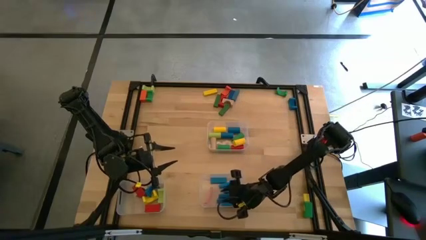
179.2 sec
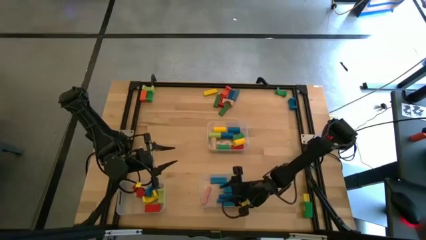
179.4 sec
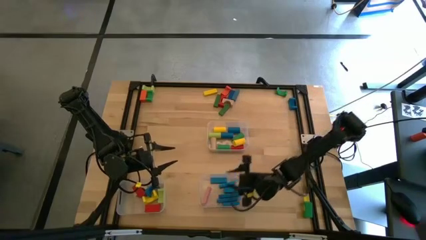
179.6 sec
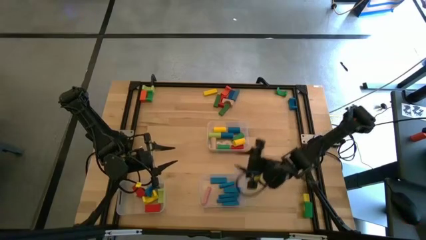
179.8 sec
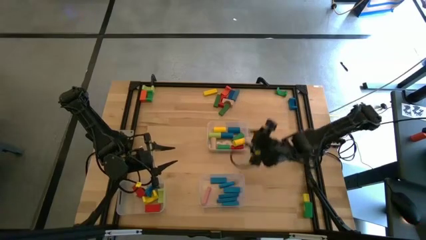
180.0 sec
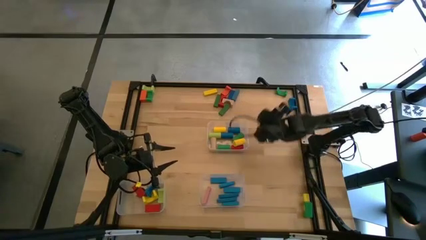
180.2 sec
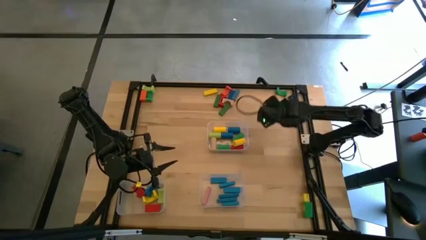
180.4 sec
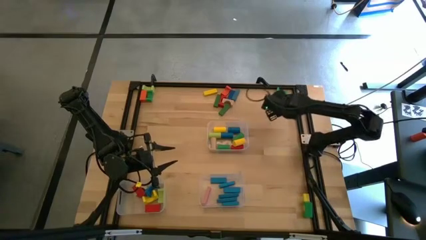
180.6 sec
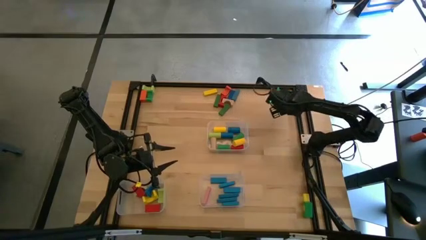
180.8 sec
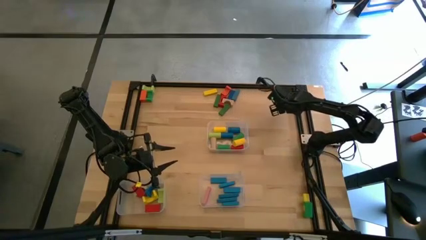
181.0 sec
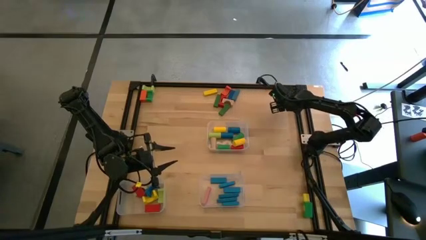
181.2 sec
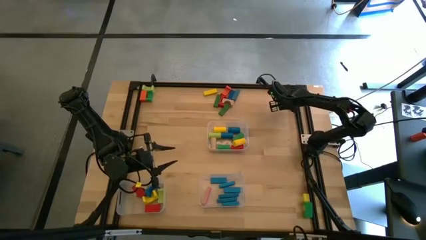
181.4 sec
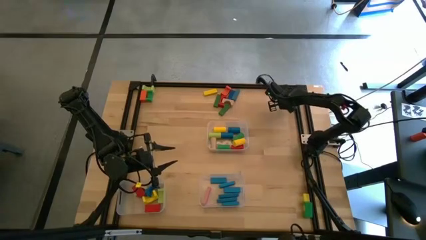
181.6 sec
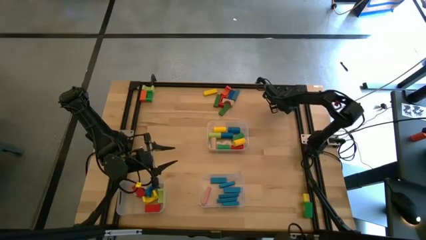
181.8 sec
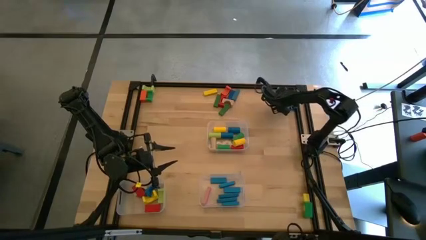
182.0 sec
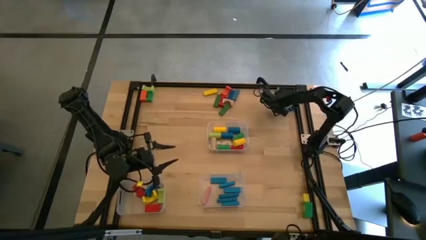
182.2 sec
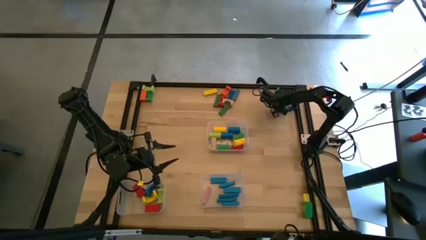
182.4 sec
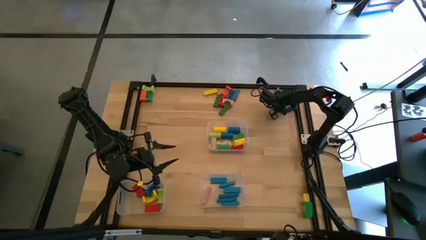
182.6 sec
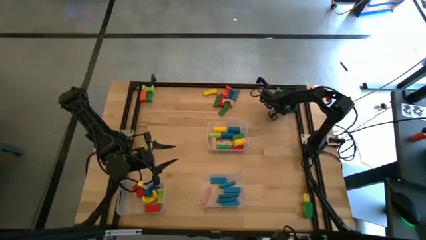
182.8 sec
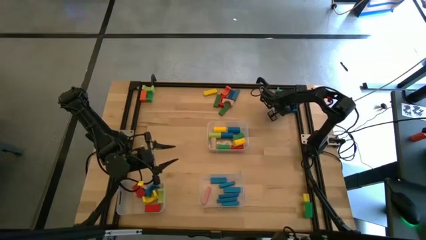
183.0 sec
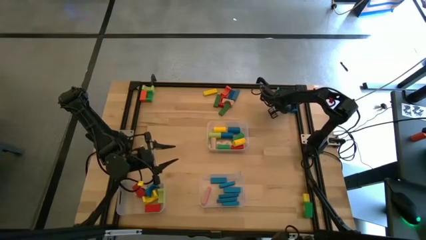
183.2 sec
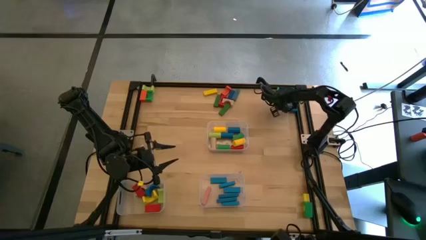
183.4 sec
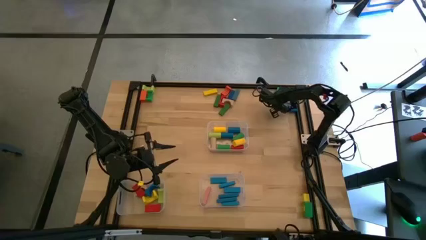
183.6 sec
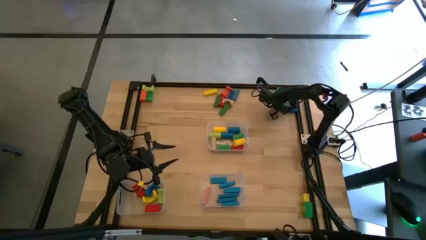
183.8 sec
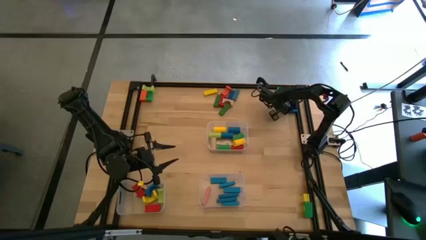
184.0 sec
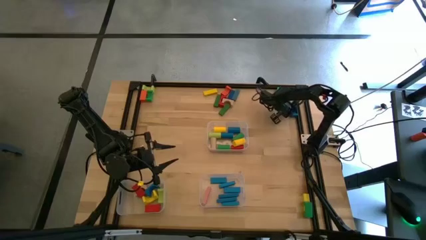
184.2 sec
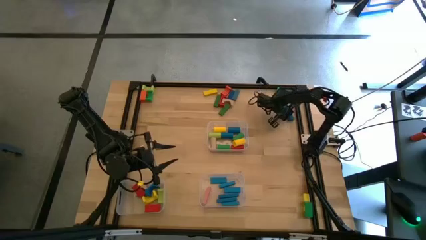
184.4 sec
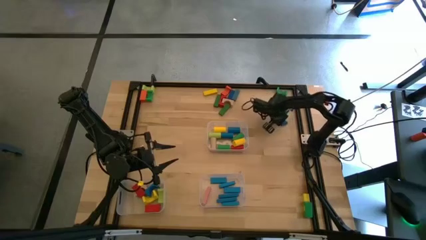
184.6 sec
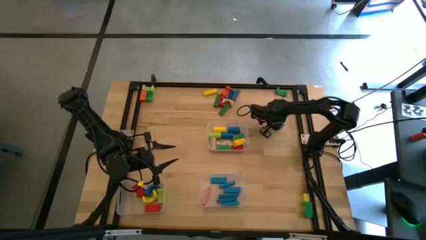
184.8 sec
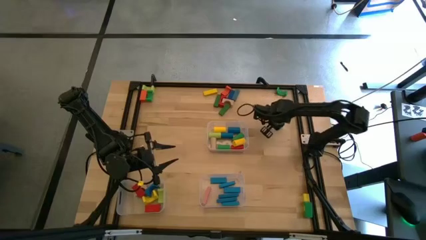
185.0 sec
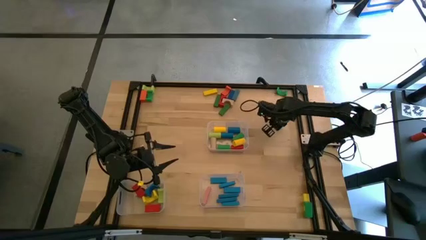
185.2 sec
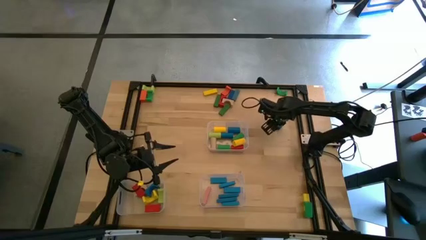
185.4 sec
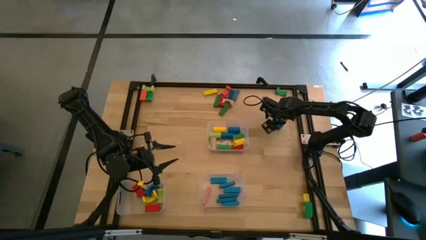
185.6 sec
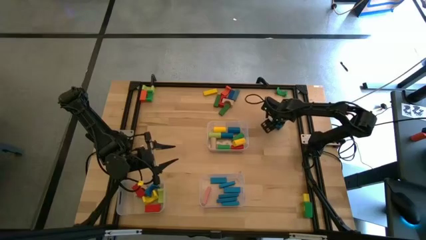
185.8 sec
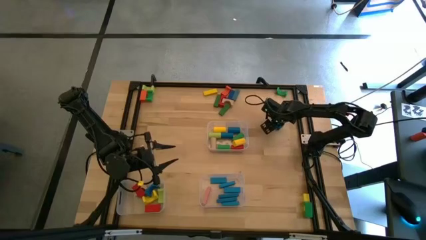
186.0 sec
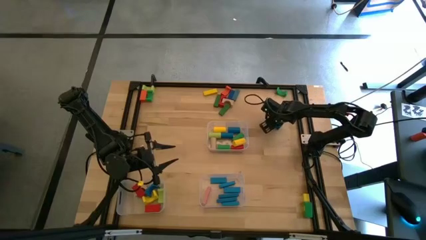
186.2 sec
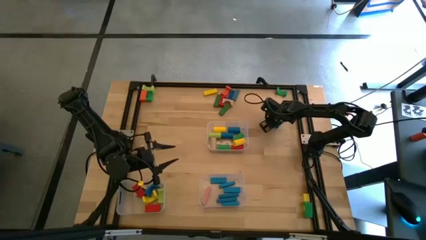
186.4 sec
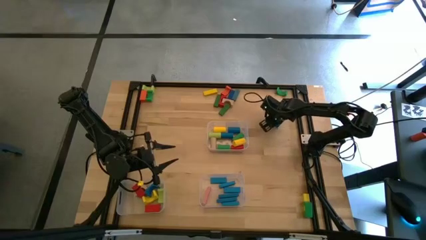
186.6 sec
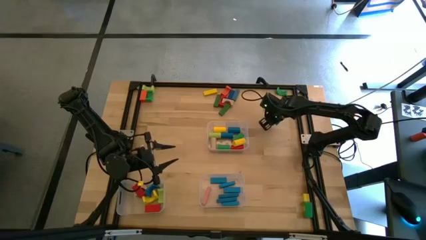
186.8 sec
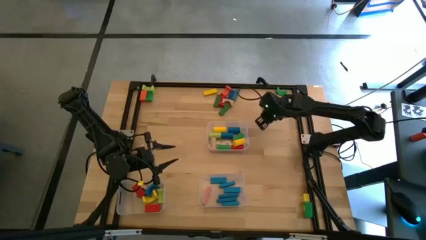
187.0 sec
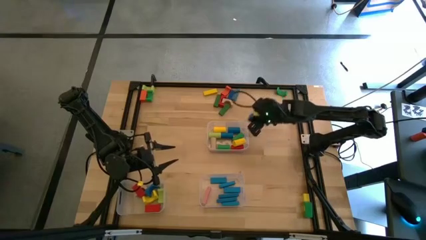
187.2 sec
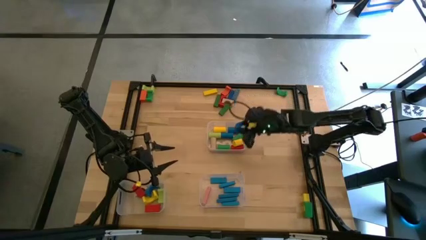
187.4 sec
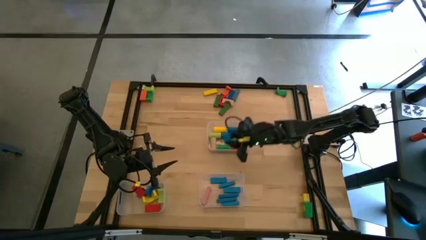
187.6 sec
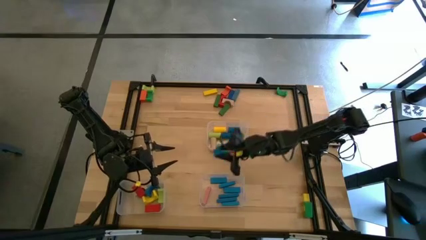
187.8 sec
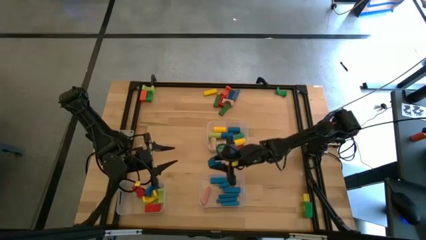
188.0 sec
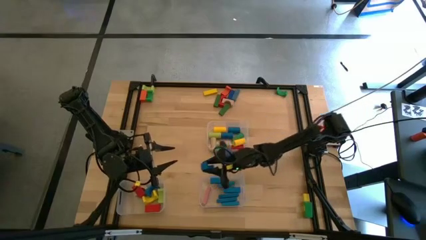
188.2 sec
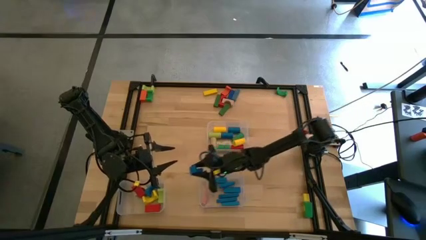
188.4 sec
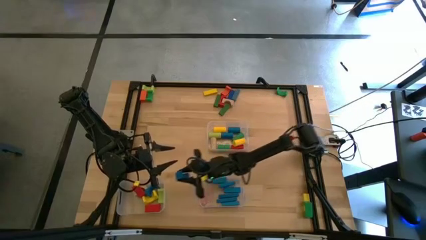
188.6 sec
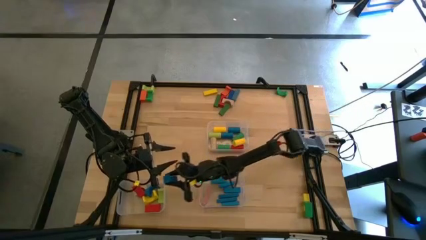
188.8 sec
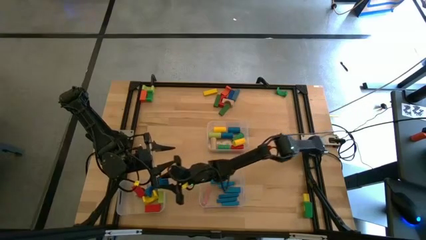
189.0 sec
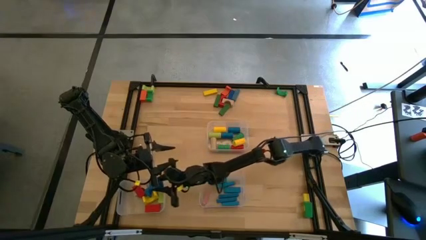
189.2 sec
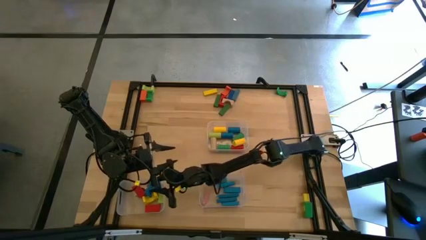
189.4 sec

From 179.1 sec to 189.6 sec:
Task: Sort blocks by size
Put the blue arch block into the bottom left transparent bin

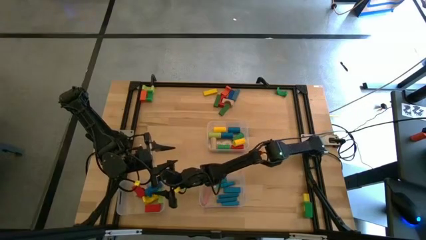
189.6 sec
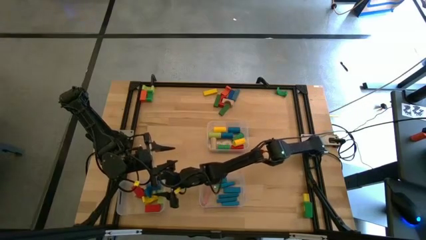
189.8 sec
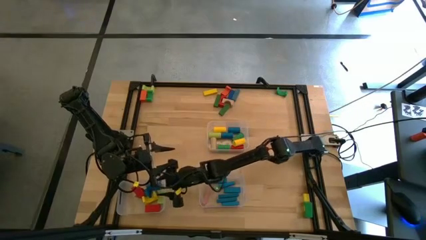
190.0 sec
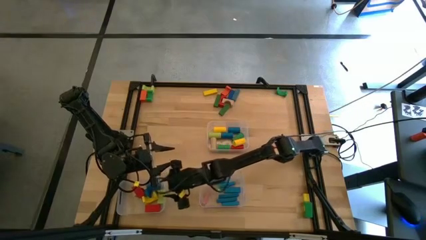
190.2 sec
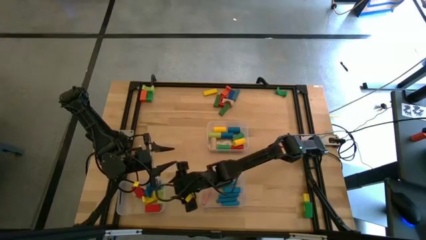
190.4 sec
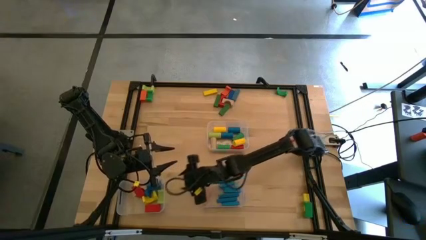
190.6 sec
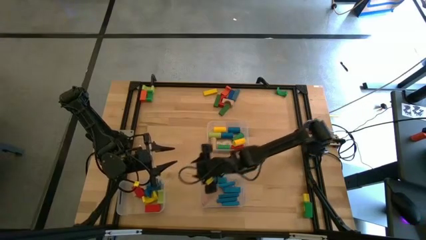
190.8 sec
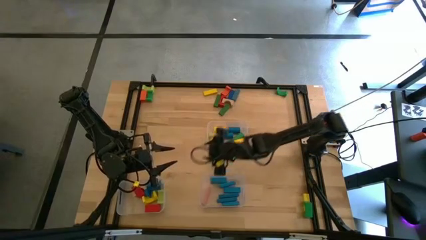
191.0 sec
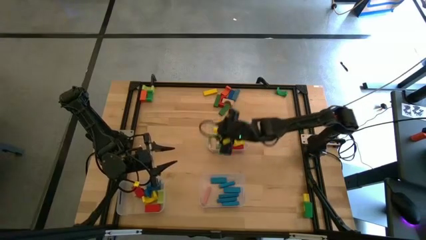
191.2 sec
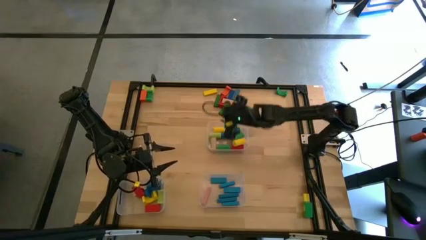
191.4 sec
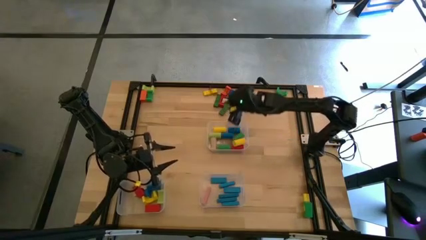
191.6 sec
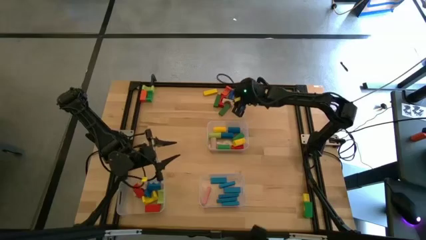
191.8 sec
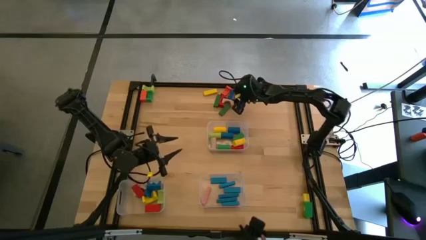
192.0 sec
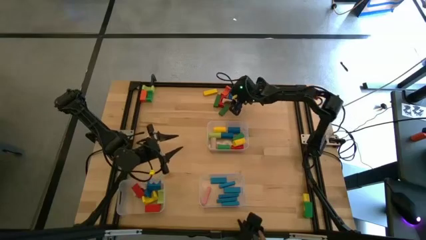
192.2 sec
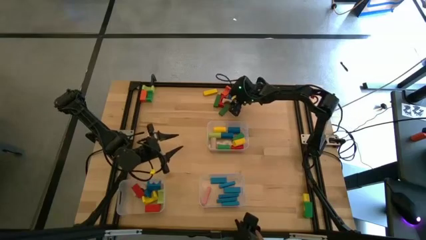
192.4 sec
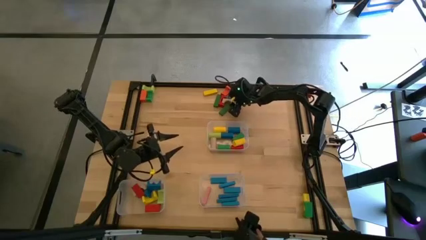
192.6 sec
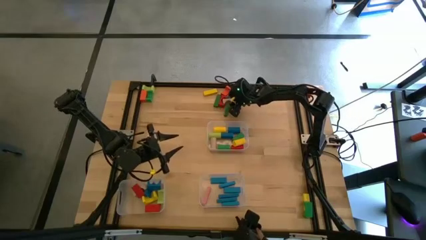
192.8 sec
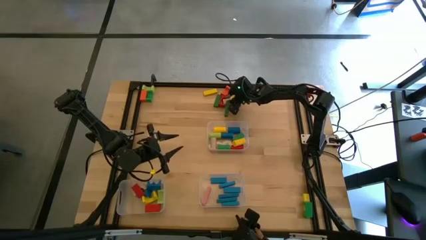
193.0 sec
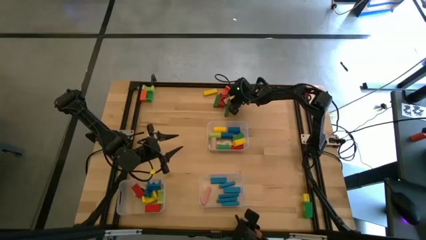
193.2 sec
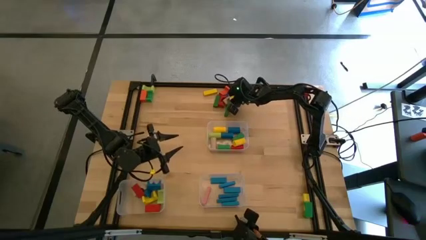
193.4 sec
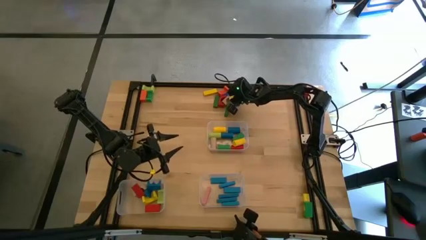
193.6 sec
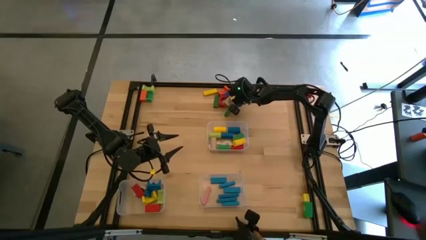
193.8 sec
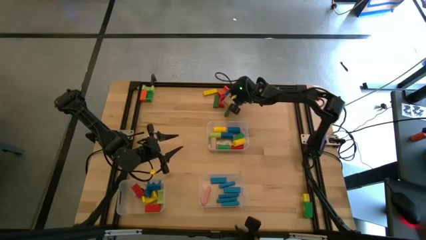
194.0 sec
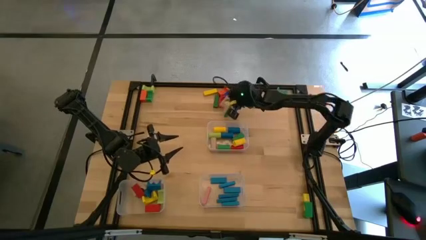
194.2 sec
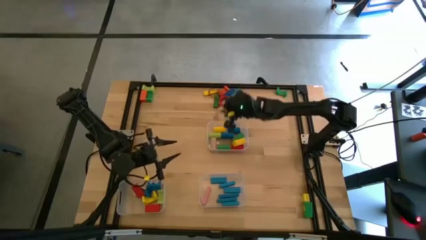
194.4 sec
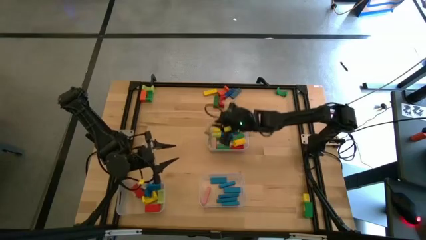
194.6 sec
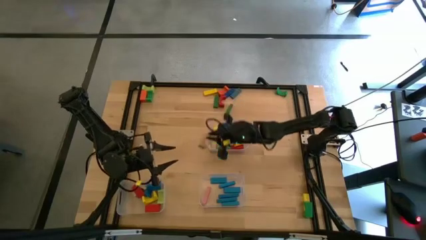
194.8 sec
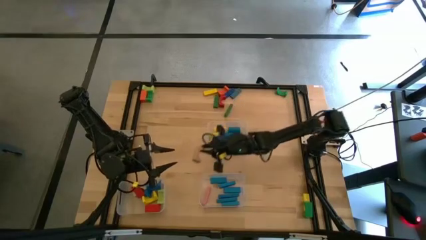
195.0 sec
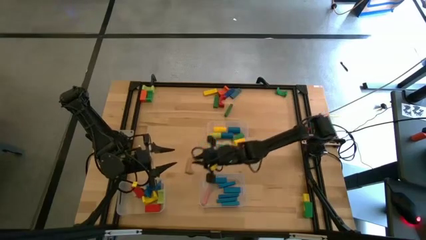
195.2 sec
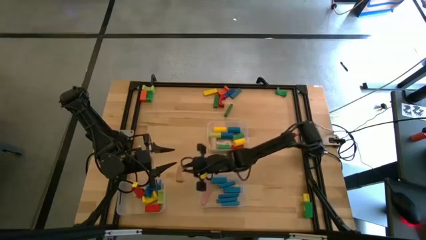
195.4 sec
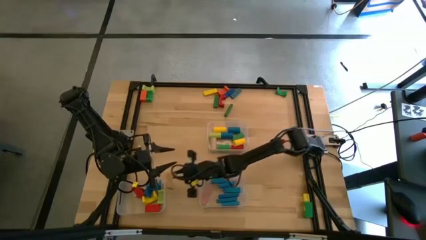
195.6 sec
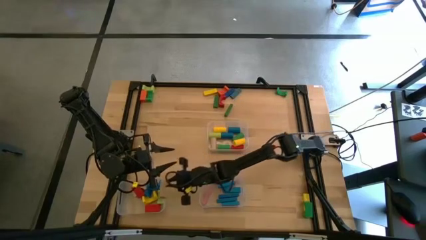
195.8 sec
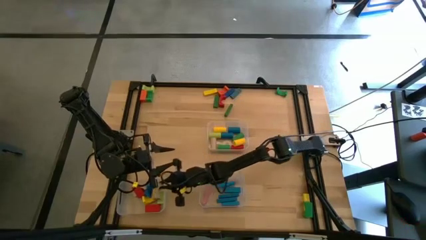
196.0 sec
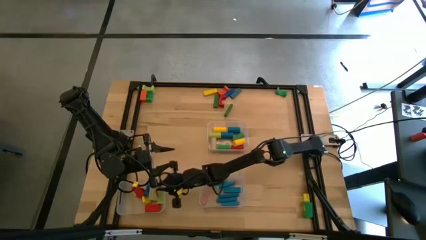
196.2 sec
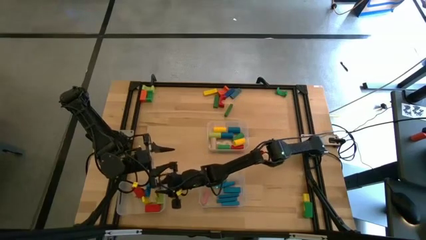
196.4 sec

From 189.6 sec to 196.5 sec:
Put the brown arch block into the bottom left transparent bin
